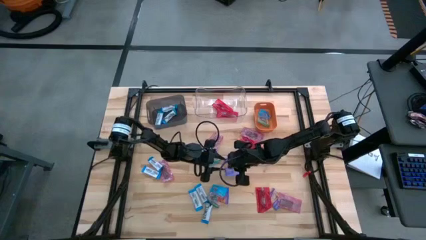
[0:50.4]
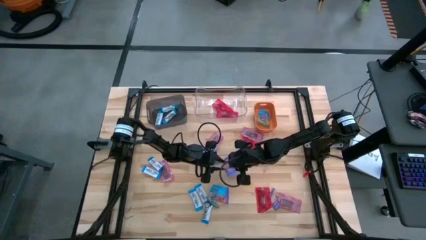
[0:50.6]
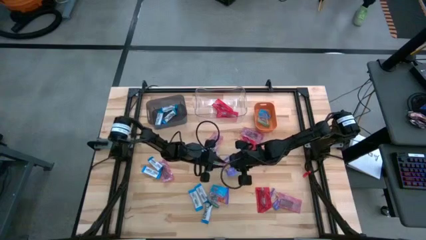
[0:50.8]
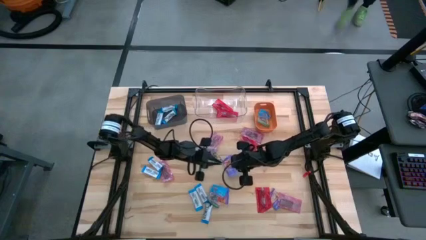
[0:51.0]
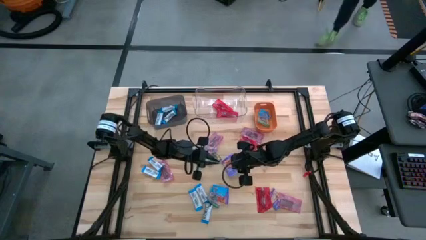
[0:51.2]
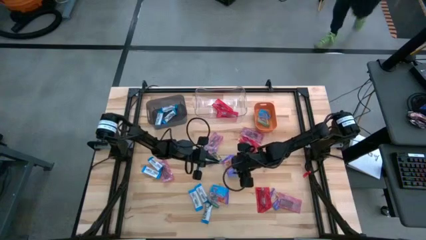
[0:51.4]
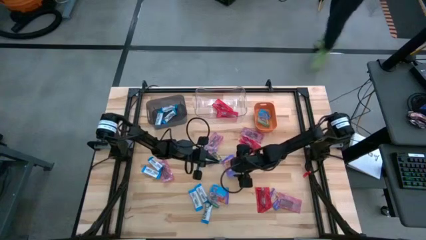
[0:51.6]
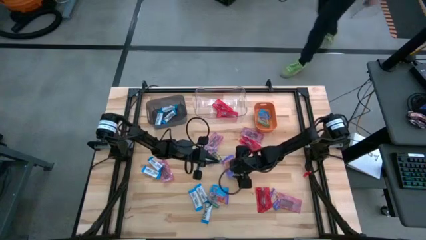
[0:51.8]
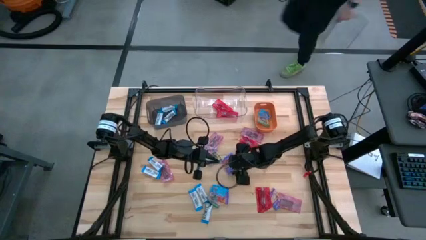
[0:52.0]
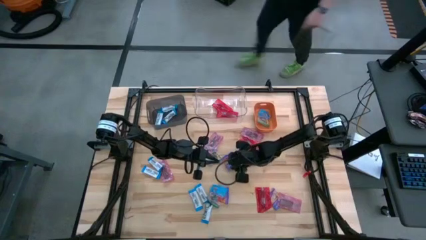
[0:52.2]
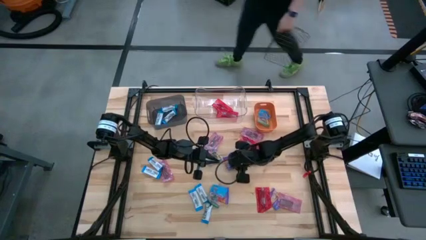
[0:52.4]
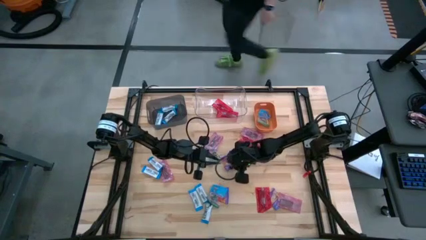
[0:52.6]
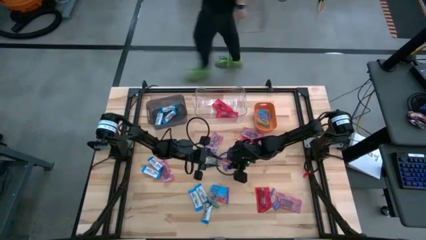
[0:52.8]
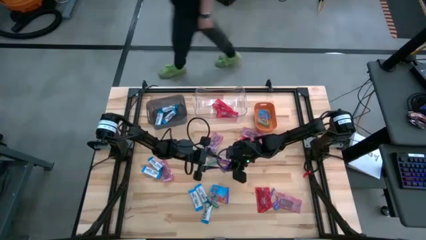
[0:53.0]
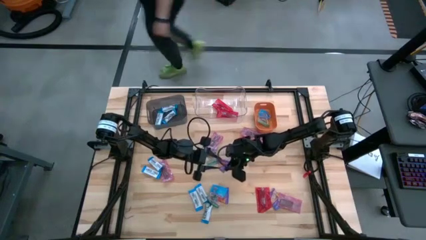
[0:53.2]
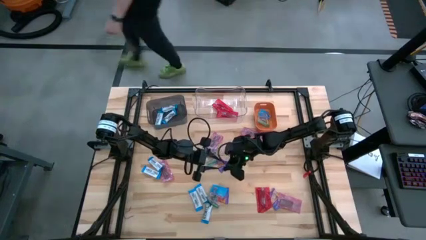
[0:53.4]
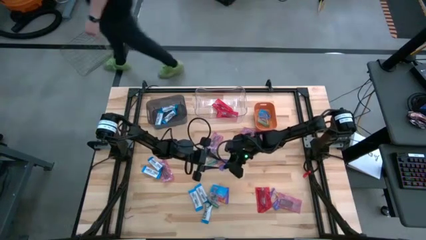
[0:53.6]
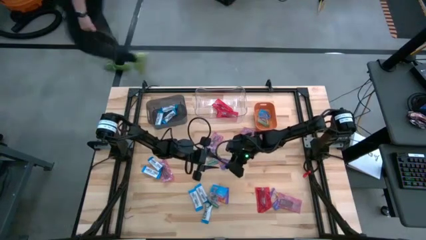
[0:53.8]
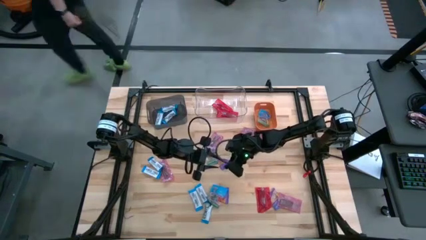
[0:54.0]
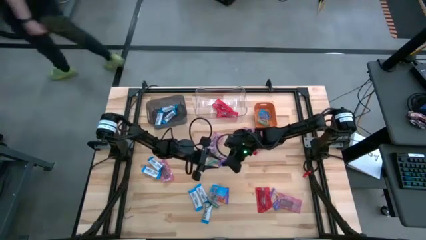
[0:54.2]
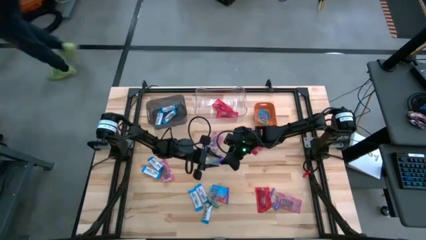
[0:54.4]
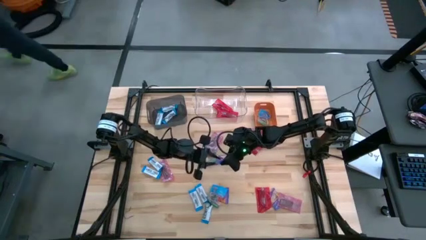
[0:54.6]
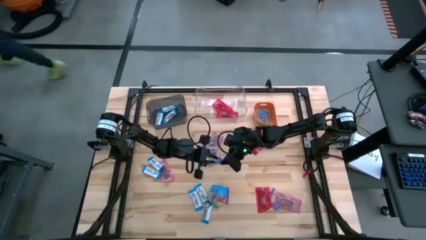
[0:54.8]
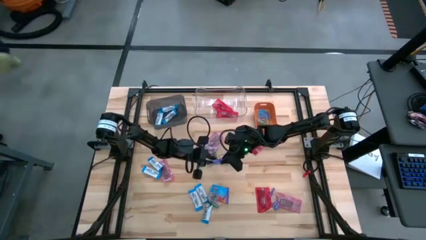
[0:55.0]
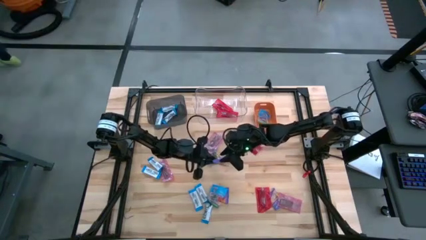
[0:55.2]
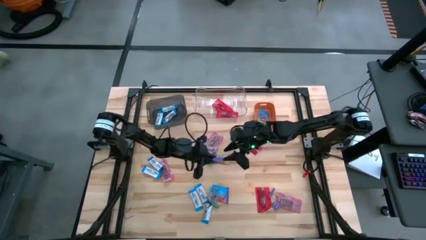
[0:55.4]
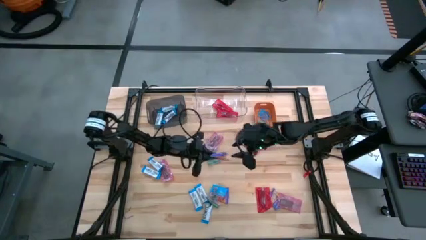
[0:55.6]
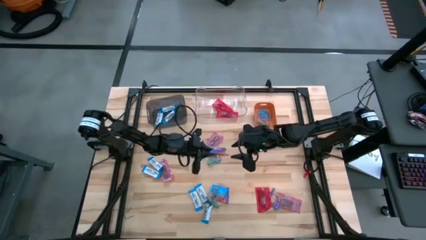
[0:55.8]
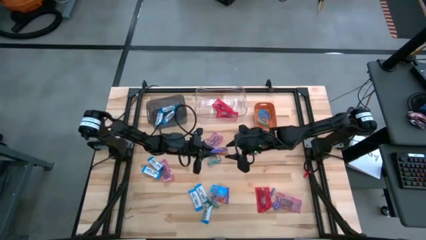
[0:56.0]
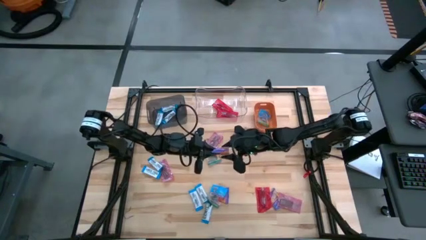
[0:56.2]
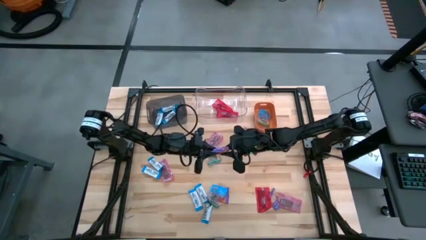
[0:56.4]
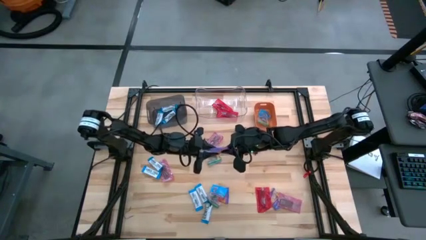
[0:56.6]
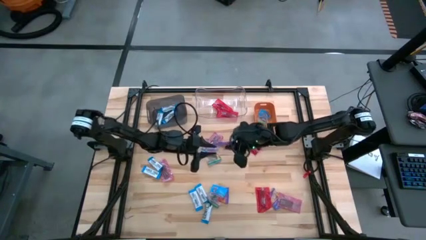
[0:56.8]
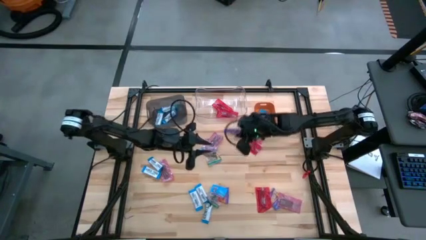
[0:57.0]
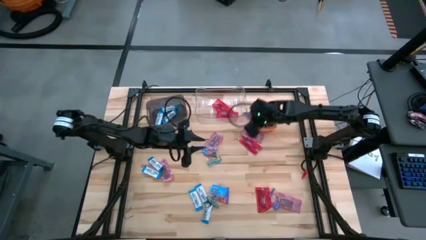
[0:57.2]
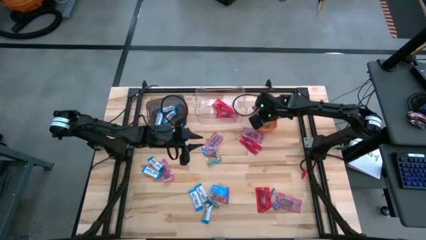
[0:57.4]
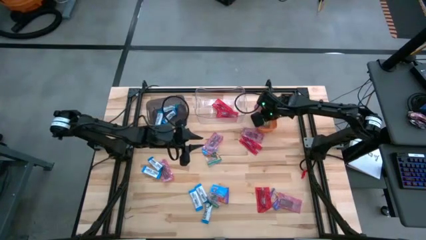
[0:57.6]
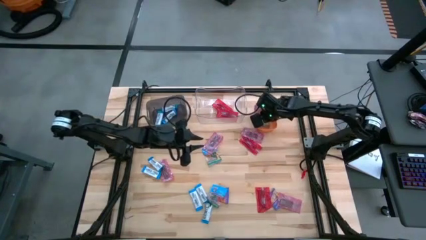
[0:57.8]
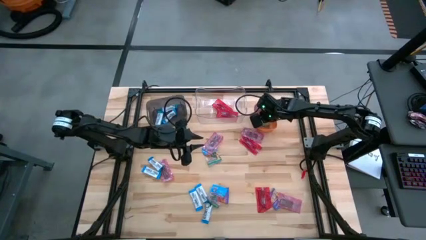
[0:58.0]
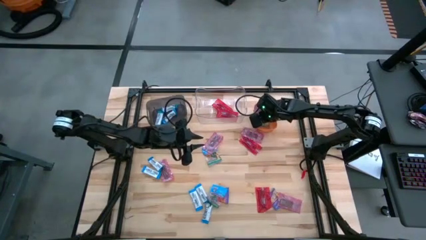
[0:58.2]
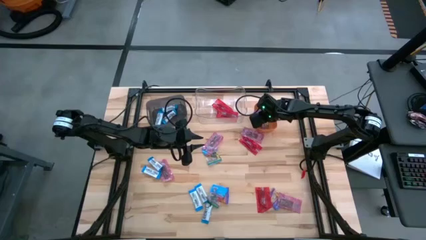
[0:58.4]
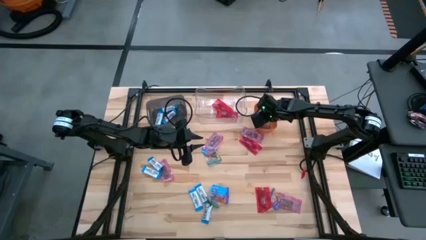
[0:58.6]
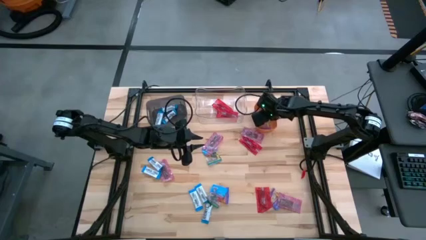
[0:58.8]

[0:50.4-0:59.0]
Task: Sort candy
Put the blue gummy into the orange bin

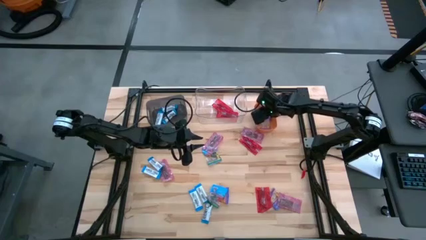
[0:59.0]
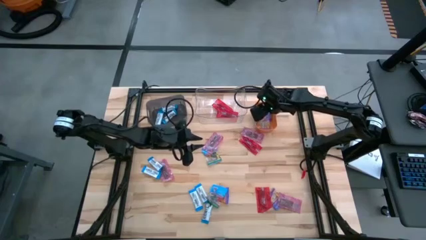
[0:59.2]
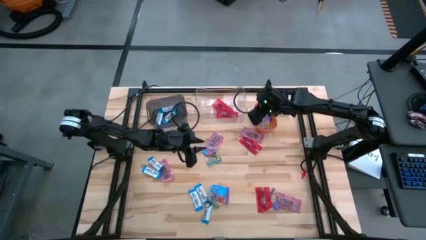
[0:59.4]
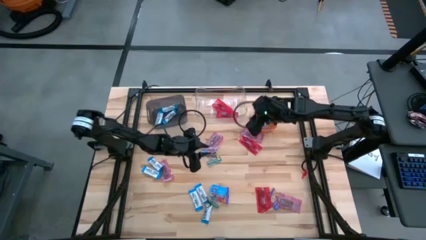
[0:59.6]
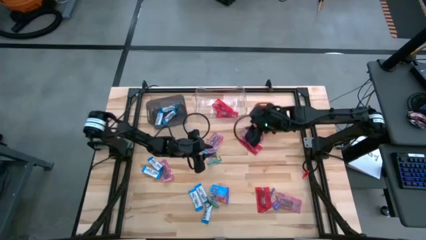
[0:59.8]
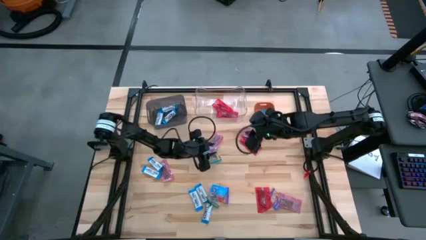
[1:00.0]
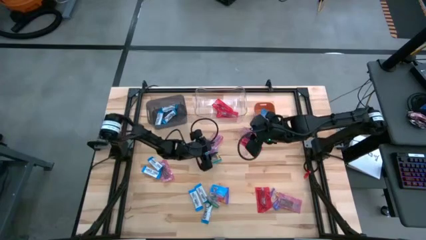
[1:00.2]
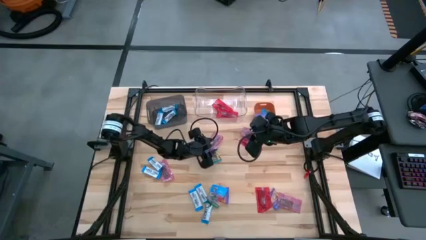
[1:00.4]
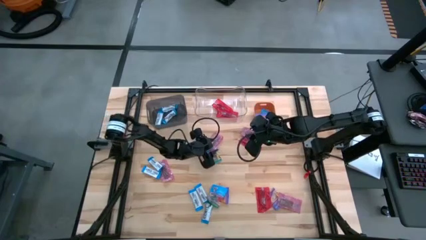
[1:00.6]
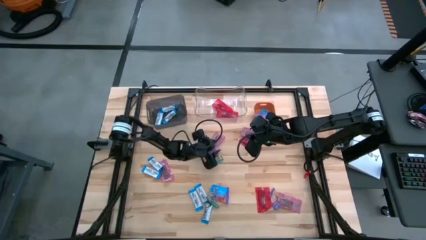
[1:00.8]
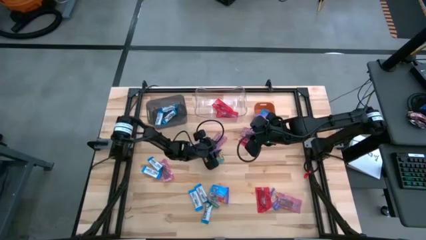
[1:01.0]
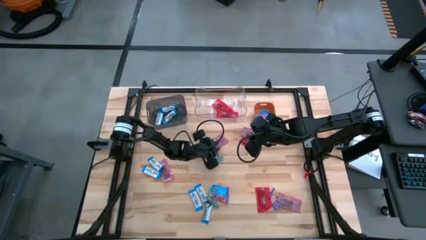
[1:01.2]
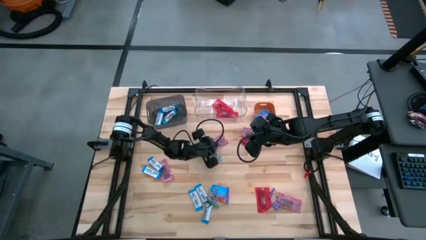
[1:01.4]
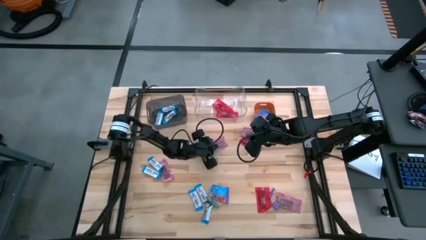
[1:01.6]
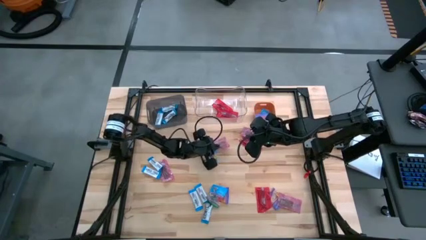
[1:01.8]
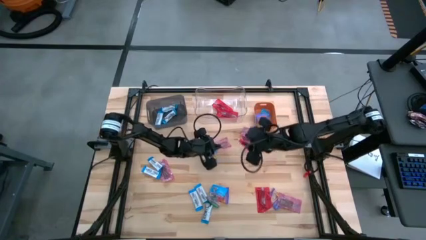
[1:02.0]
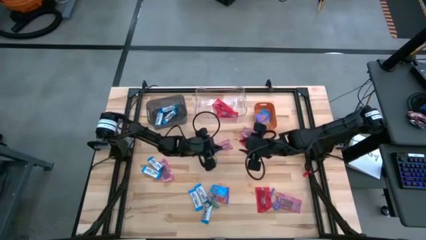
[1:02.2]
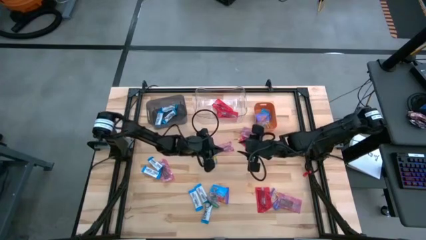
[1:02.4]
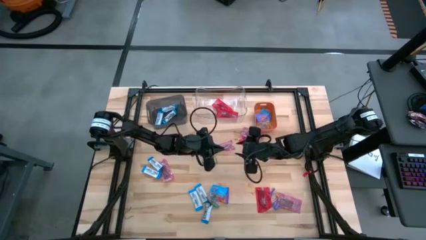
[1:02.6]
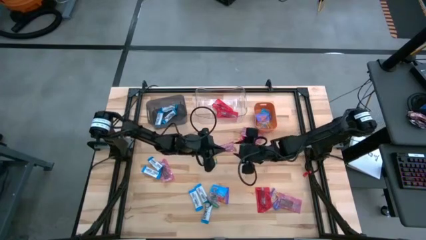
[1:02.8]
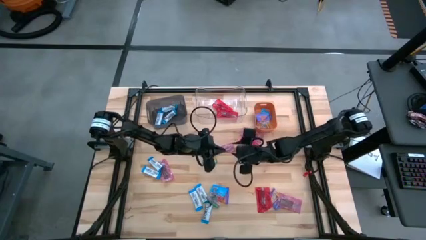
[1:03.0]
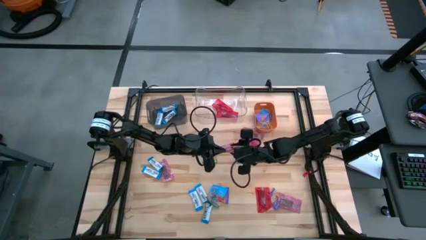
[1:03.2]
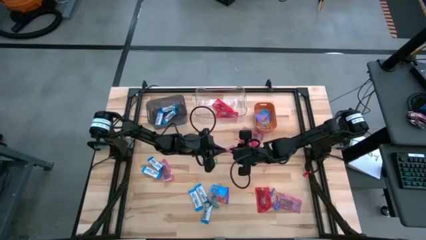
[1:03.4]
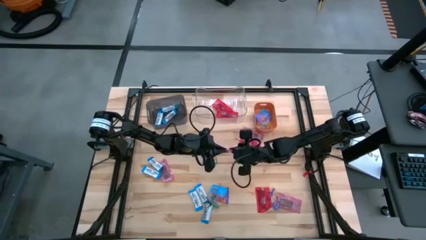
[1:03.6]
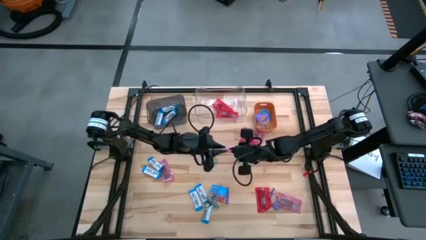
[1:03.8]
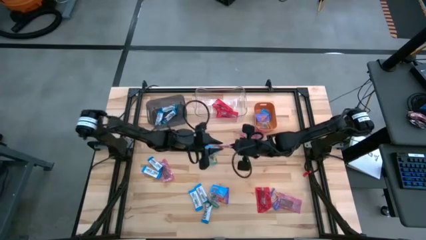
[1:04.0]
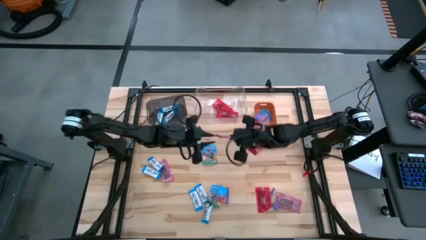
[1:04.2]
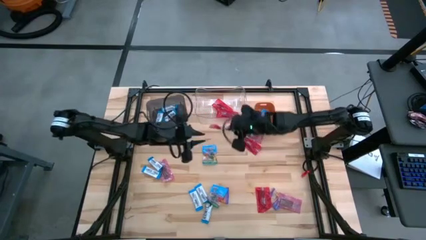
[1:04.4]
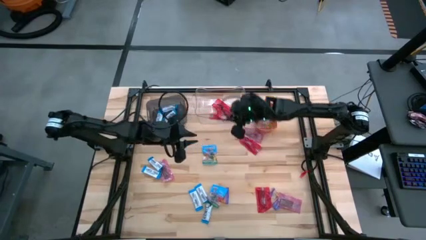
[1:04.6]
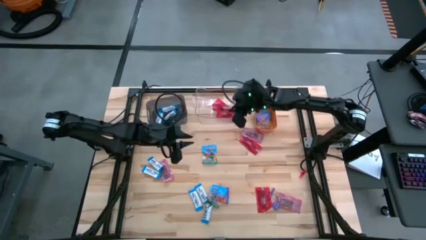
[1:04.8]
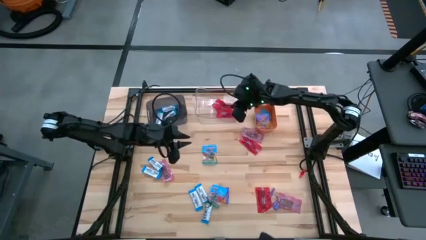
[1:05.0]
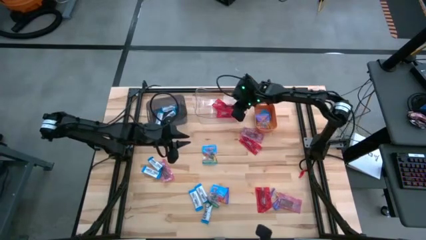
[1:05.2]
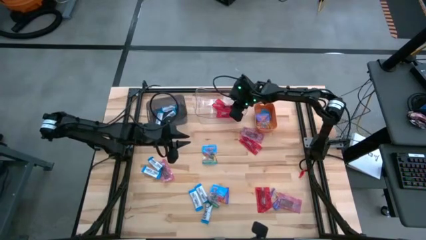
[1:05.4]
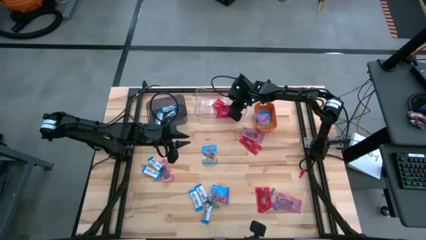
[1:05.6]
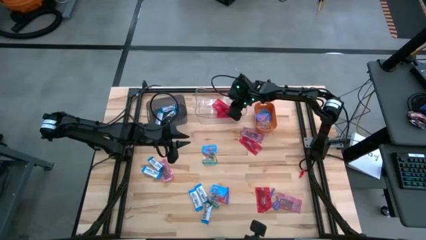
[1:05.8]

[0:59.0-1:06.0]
Put the red chocolate into the transparent bin

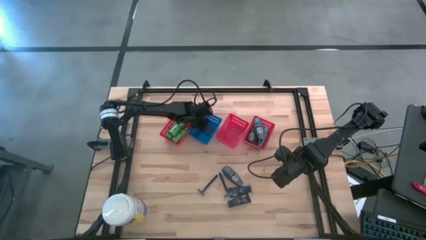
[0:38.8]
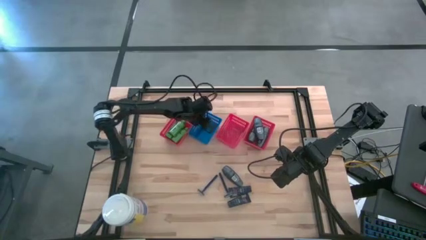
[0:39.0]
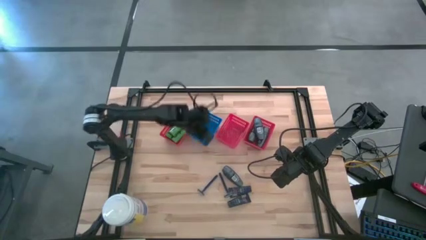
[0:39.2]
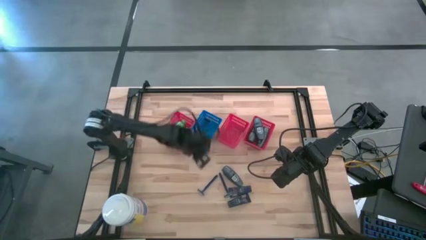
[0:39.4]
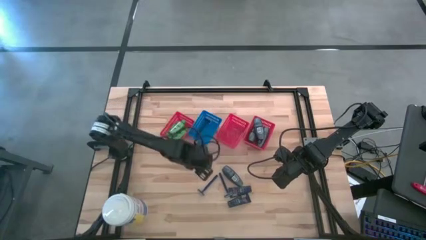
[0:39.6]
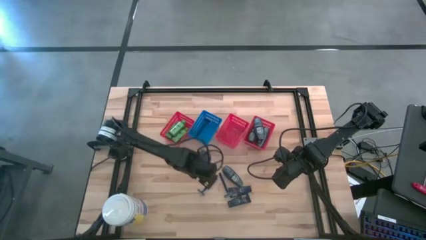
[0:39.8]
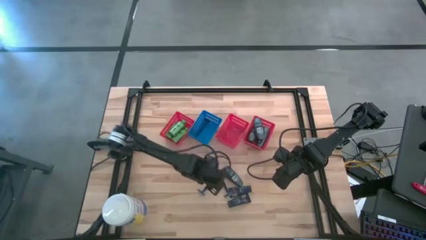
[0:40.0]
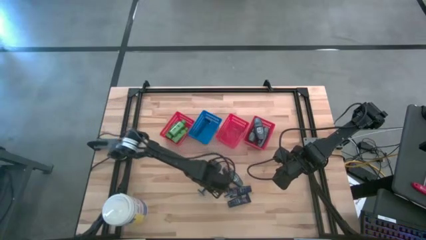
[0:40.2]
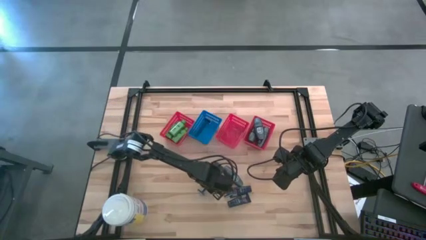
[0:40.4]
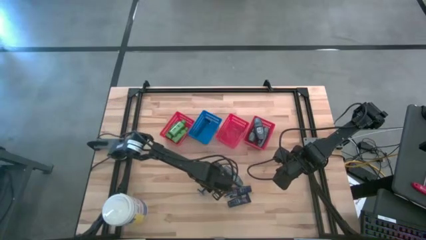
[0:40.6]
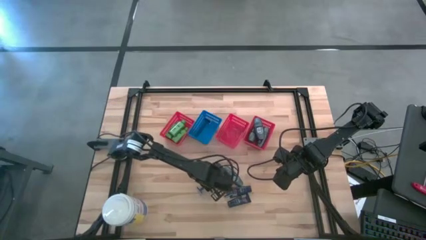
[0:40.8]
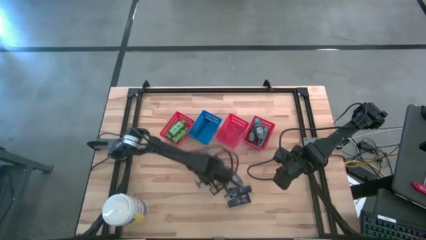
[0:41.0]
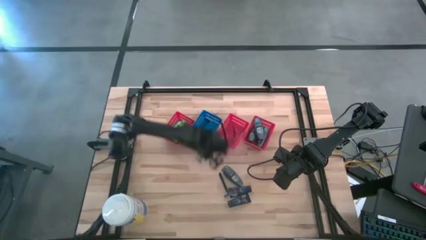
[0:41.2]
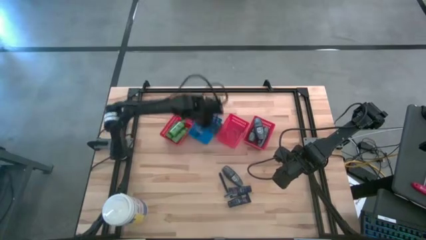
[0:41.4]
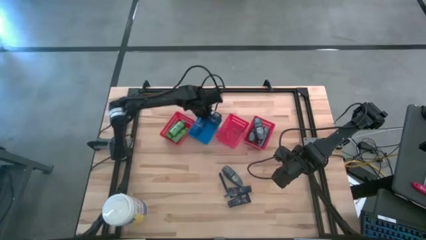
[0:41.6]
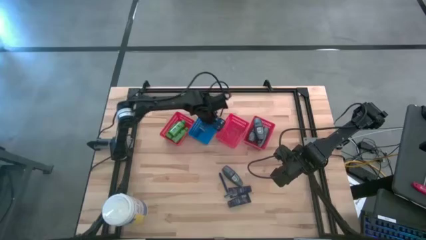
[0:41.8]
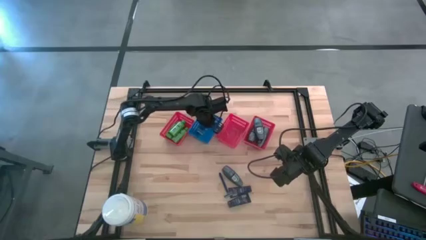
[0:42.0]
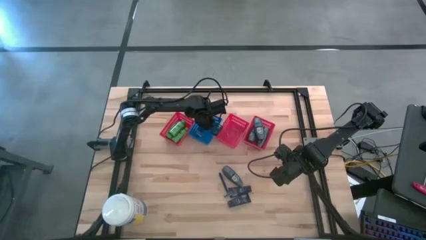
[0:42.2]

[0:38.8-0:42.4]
Task: Pick & Place Travel size toiletries
Put the blue razor into the blue bin
